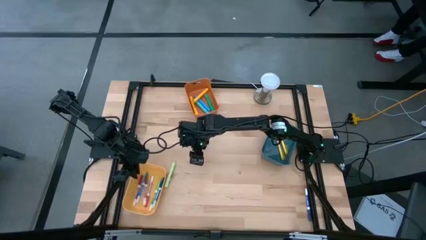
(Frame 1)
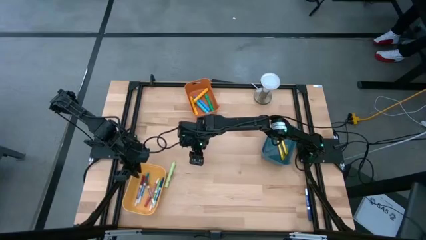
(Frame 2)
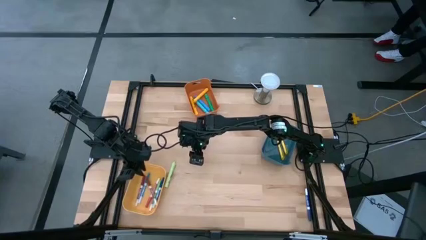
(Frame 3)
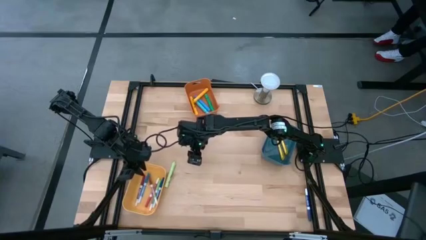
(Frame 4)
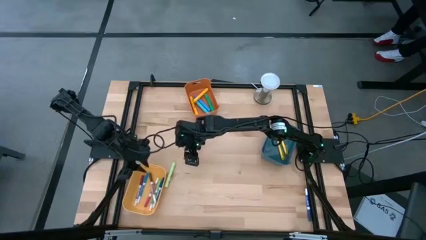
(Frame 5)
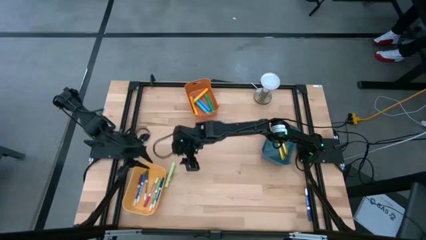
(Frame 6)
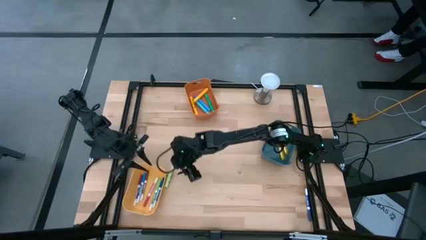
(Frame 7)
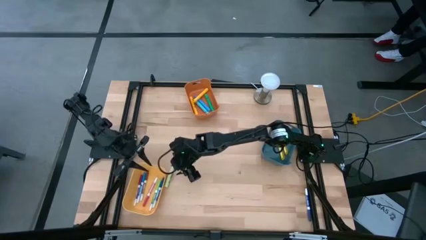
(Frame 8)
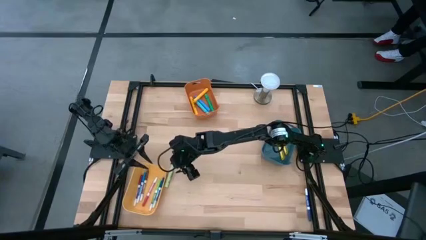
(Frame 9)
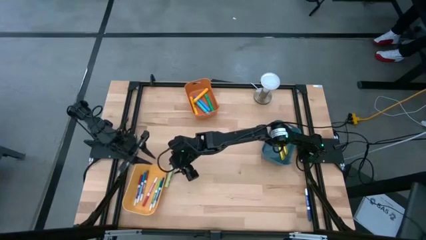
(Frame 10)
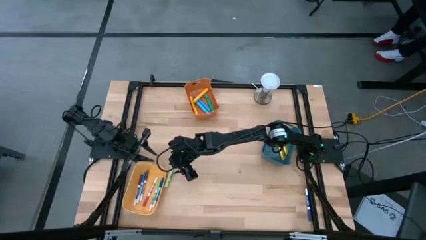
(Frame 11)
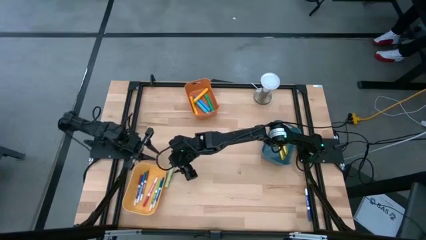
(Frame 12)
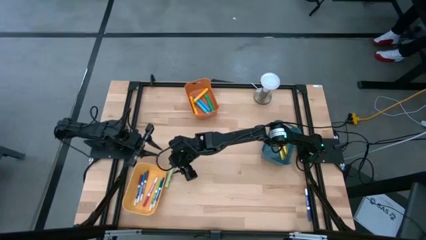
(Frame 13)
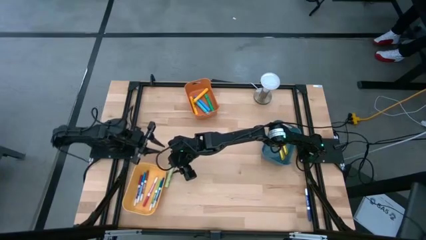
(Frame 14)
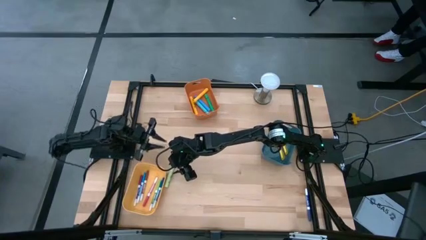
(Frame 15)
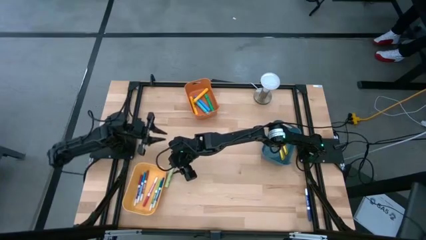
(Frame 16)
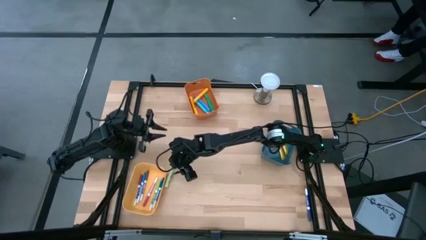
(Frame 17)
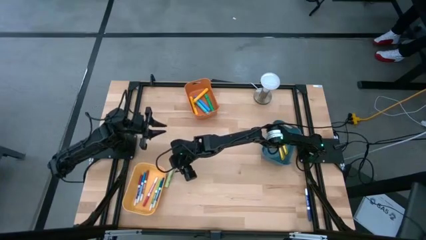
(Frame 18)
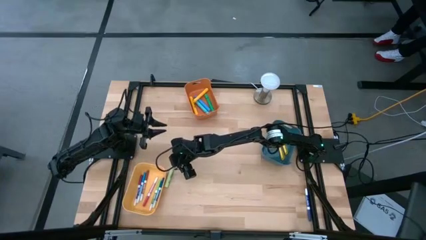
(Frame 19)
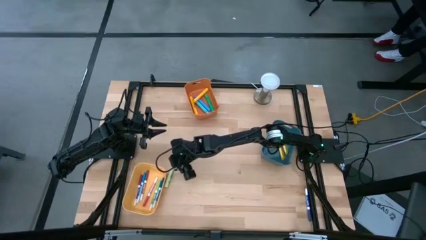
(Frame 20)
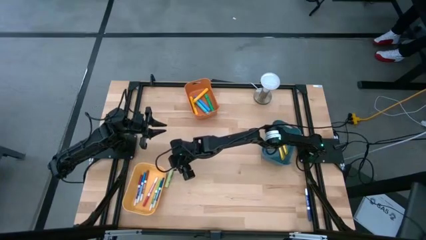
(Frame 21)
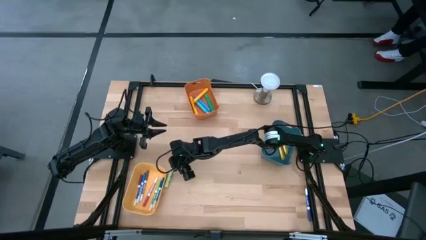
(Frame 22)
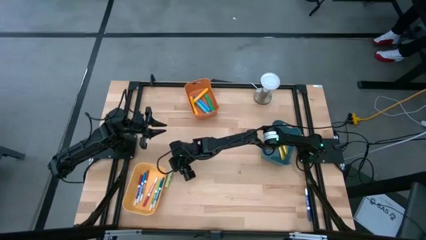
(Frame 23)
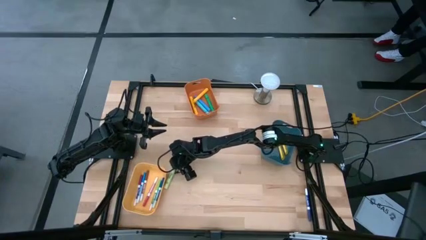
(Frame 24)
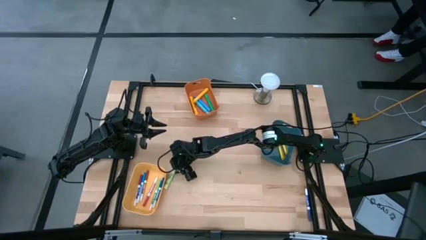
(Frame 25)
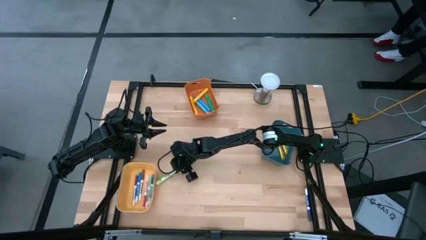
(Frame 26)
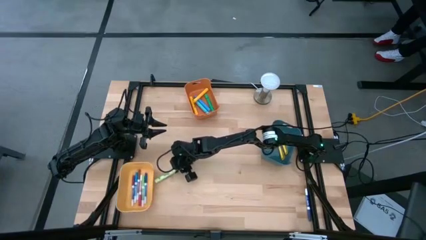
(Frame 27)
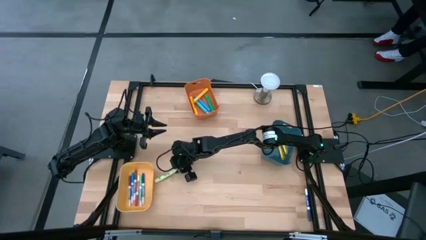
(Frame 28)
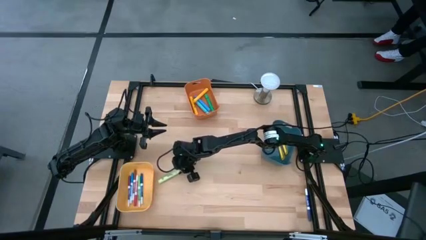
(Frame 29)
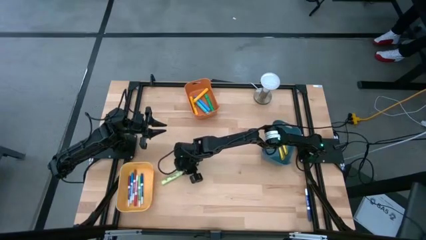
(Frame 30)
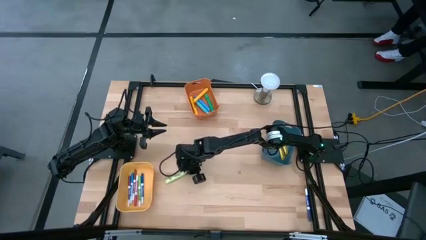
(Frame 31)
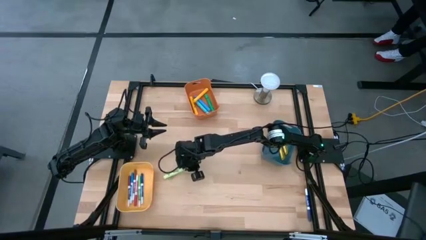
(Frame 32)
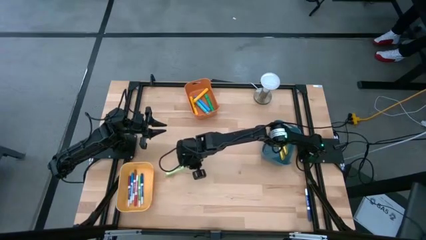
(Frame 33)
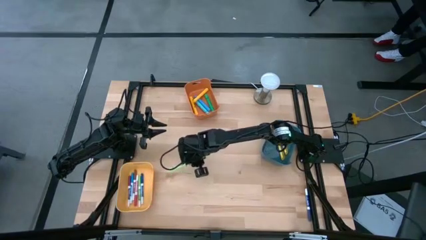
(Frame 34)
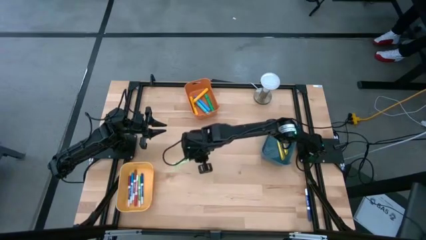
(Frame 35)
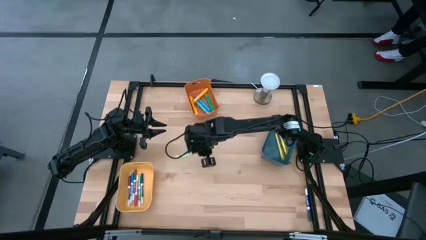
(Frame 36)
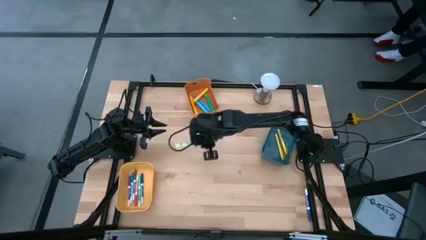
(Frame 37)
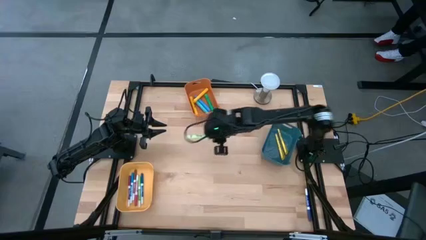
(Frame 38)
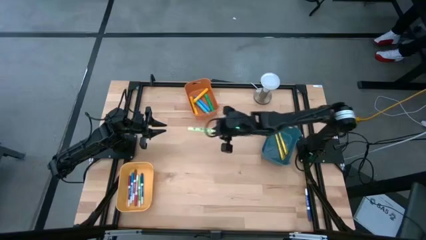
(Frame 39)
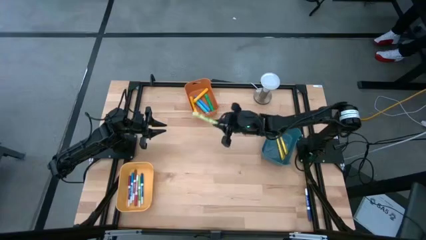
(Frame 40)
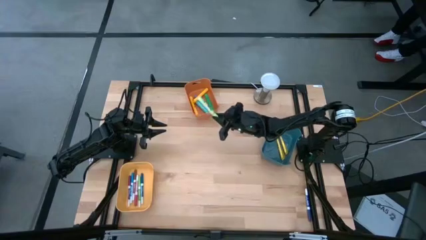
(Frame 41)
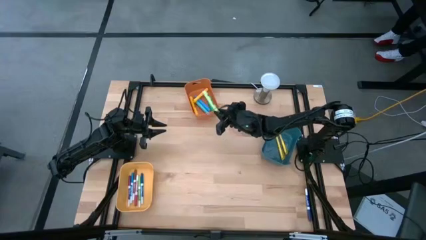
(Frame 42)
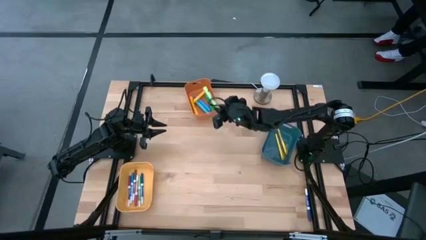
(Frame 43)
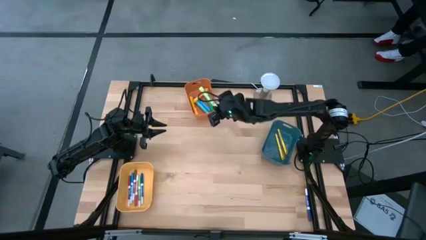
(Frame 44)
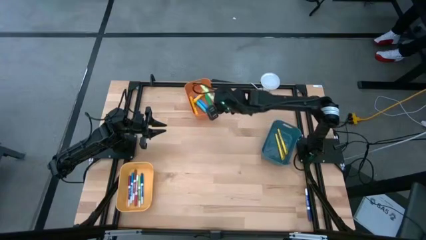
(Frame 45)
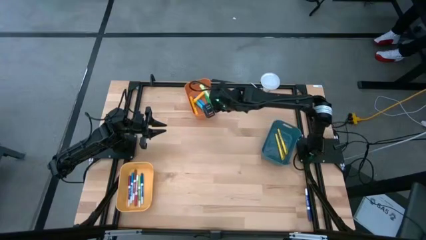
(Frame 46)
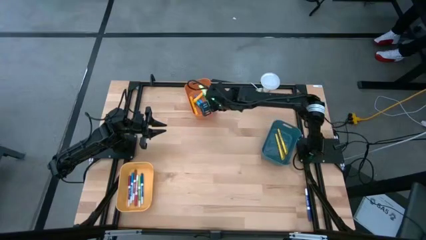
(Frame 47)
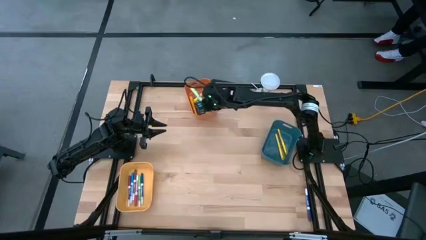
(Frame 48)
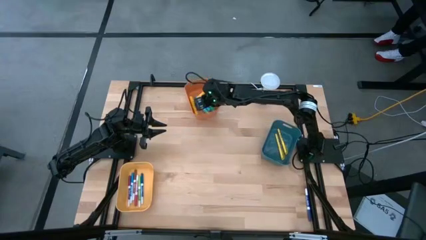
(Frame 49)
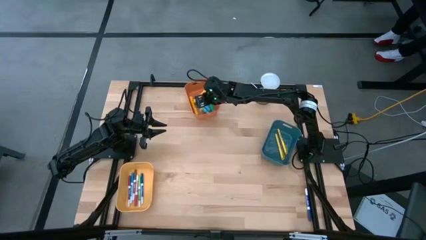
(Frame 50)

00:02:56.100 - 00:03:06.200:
Task: Pick & Place Markers
Put the light green highlighter pen into the orange bin

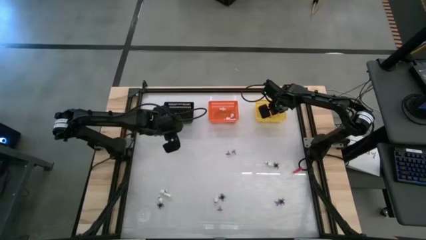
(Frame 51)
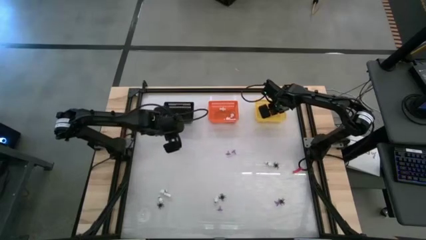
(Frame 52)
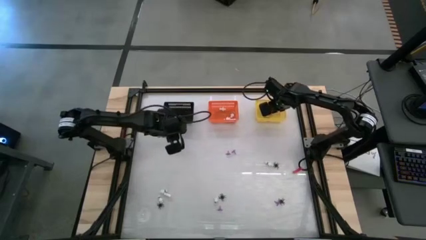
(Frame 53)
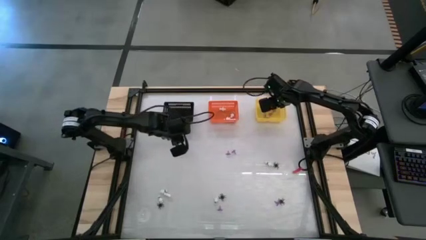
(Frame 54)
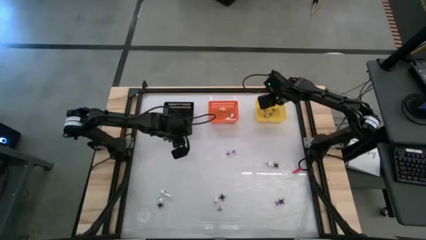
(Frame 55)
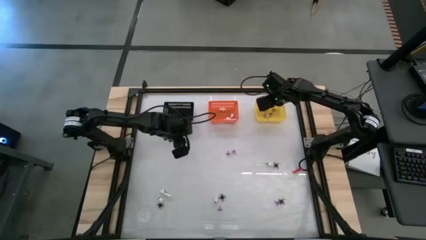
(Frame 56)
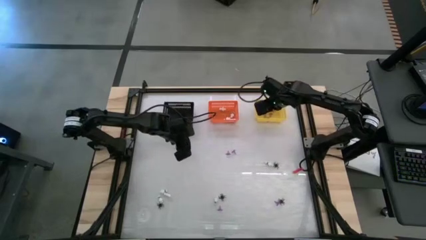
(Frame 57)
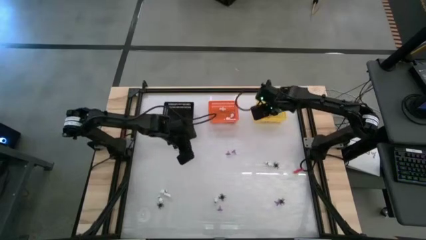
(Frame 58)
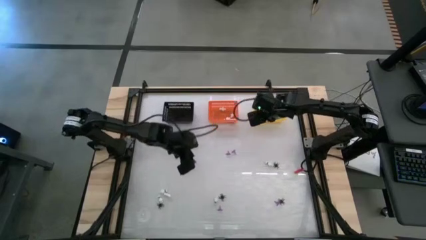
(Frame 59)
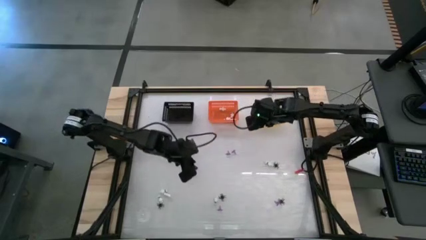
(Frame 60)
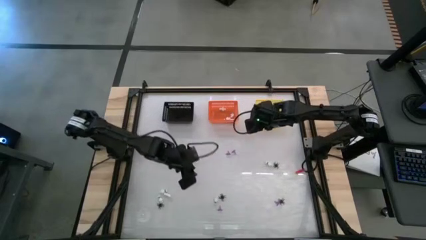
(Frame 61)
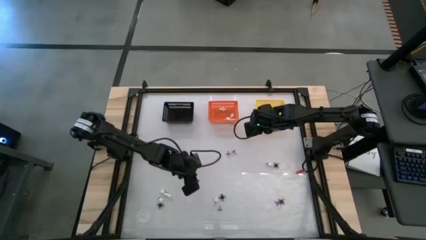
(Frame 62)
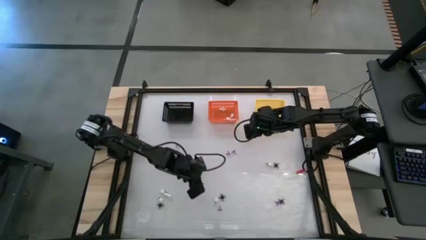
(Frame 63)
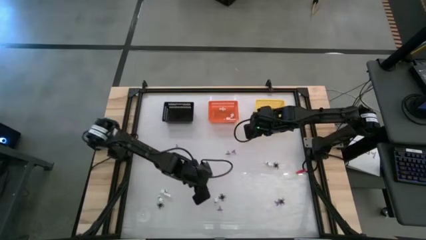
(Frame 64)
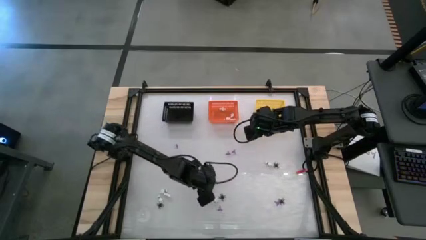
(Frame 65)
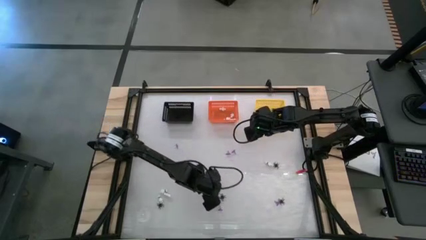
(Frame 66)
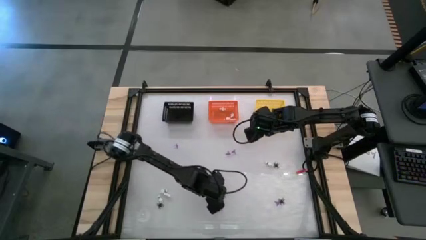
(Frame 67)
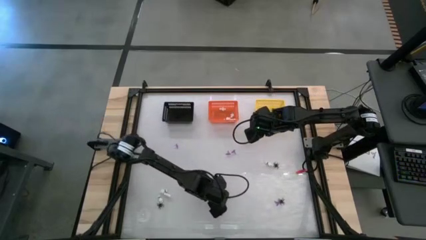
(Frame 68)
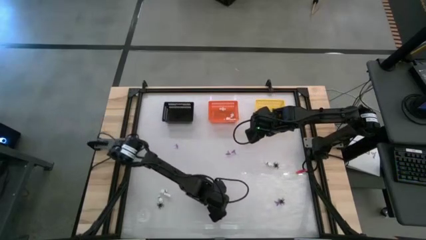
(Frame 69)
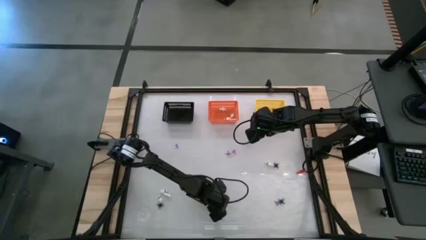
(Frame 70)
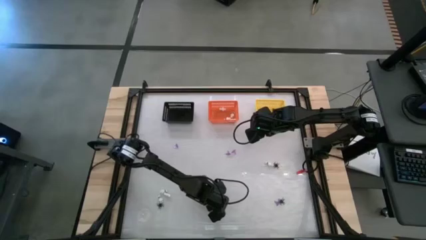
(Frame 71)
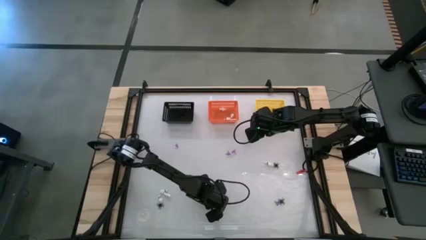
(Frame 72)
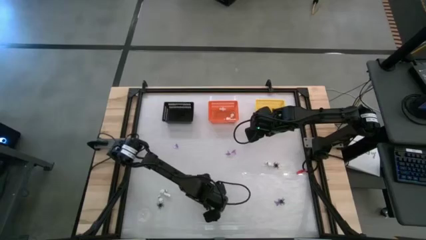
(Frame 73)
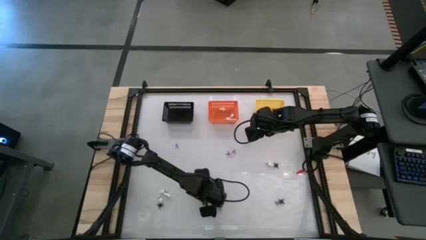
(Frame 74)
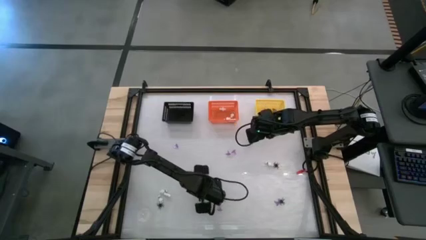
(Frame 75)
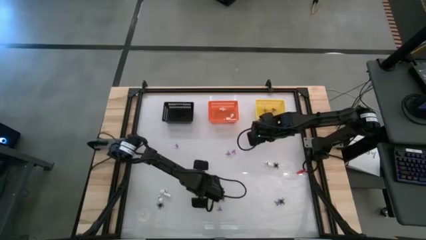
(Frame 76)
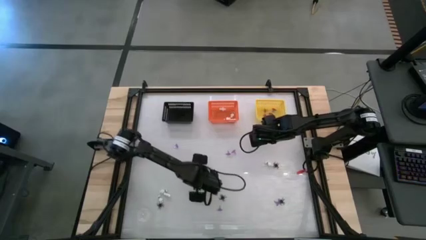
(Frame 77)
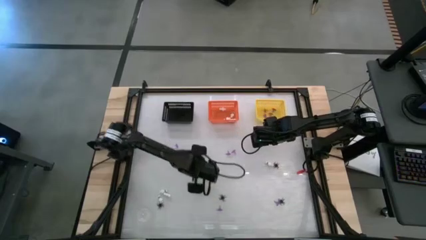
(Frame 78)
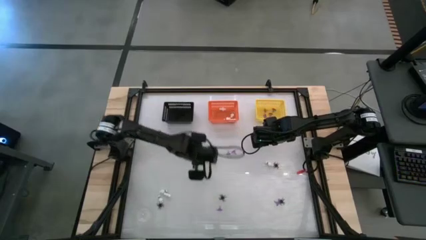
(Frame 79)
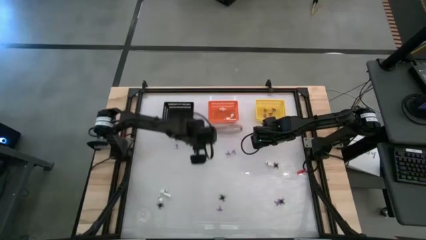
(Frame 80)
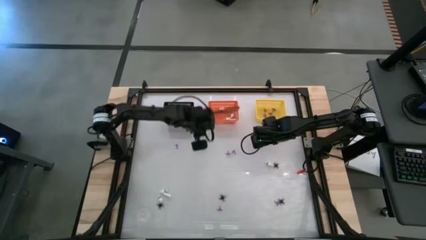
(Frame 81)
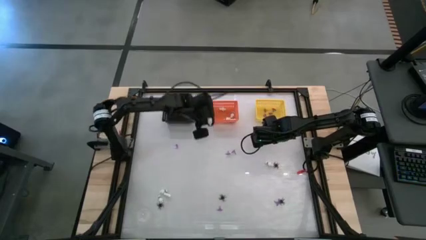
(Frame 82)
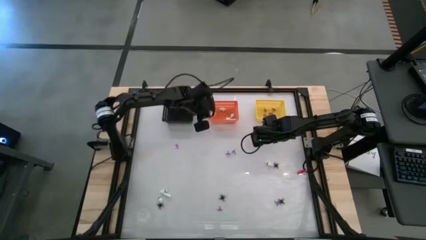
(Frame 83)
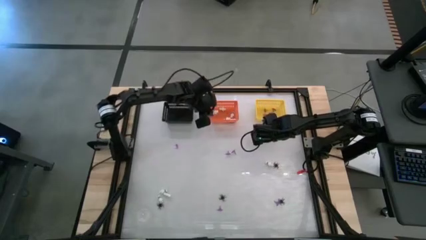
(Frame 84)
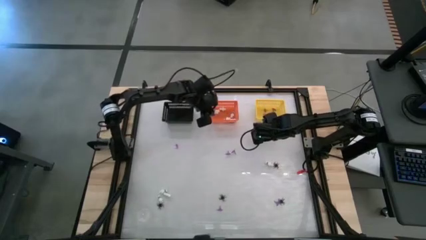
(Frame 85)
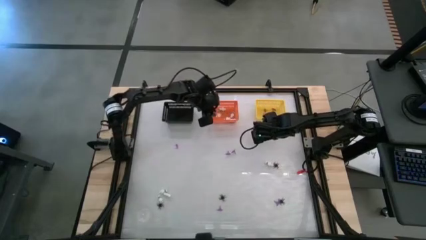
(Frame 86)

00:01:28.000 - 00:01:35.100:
Task: Sort Halloween decoration
Put the skeleton toy into the orange bin
